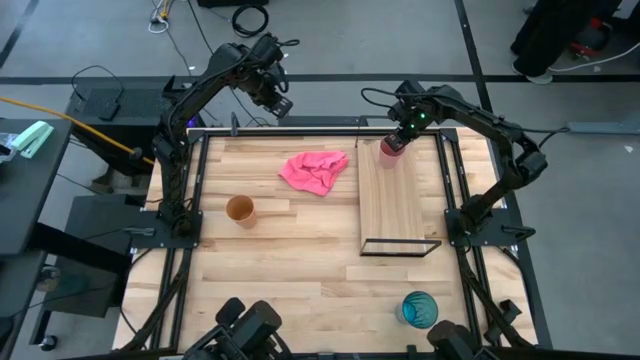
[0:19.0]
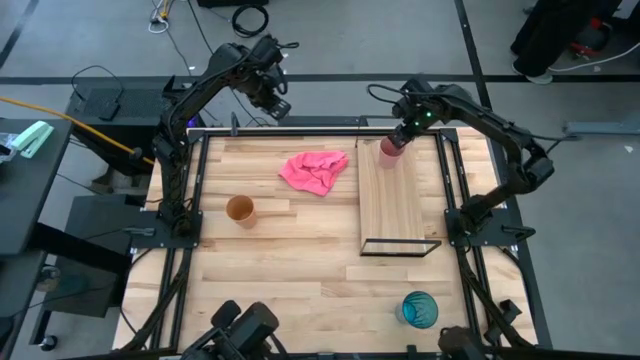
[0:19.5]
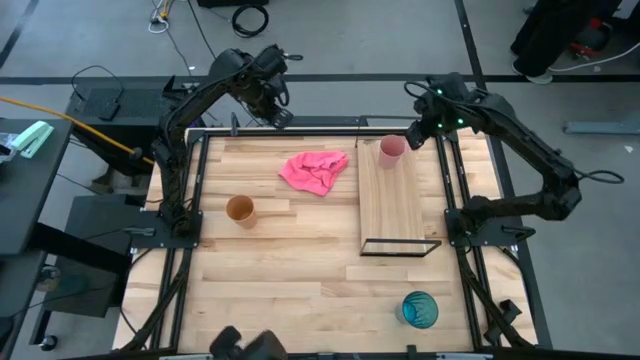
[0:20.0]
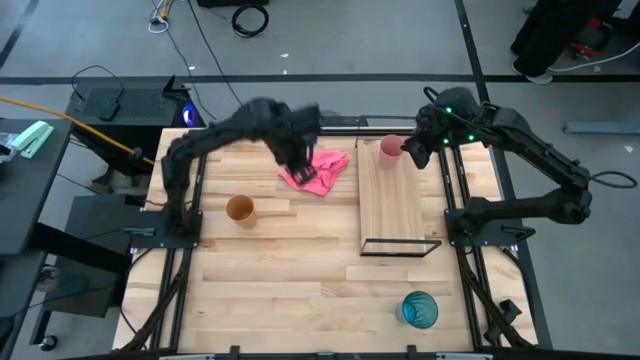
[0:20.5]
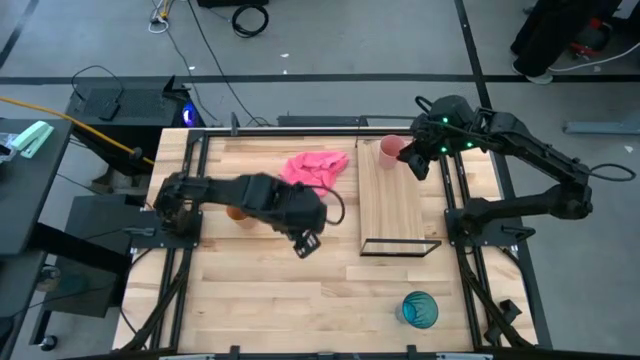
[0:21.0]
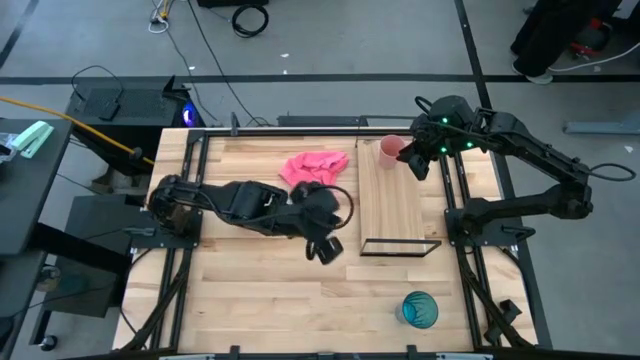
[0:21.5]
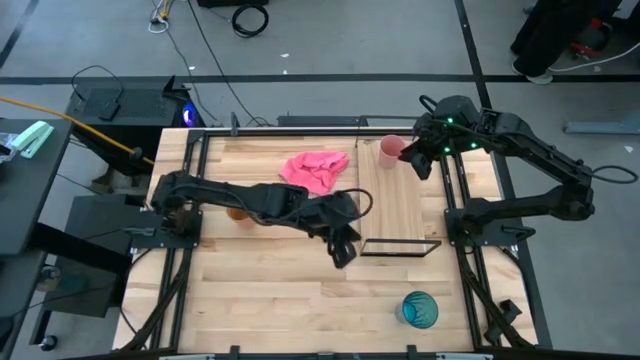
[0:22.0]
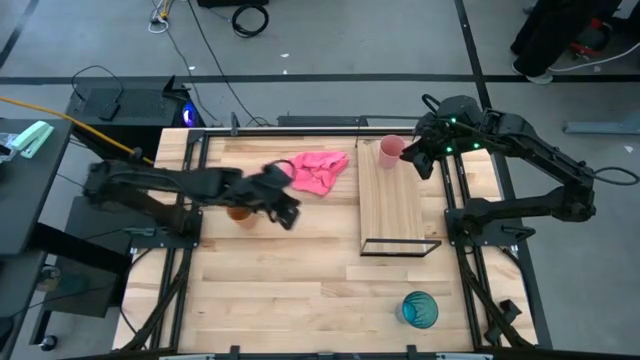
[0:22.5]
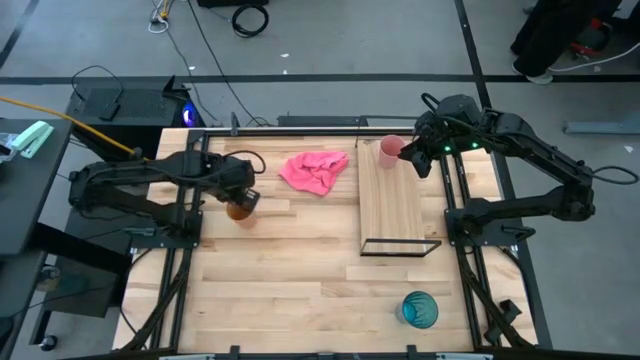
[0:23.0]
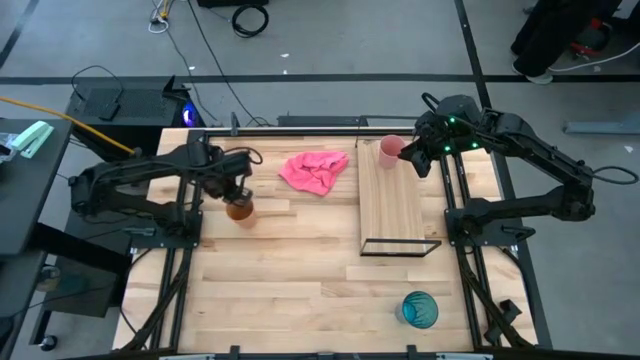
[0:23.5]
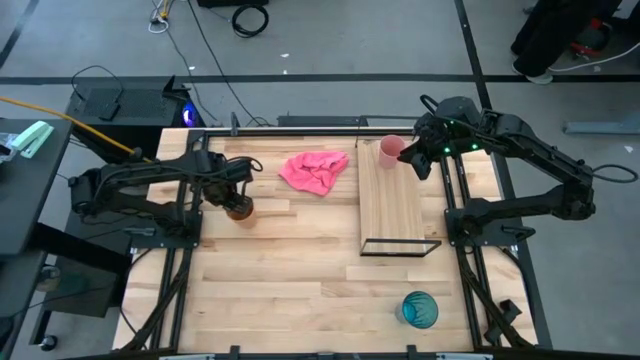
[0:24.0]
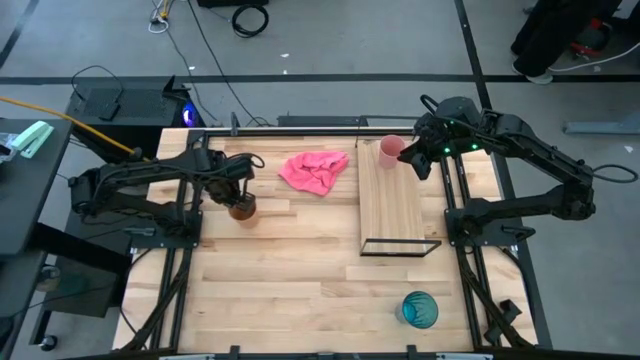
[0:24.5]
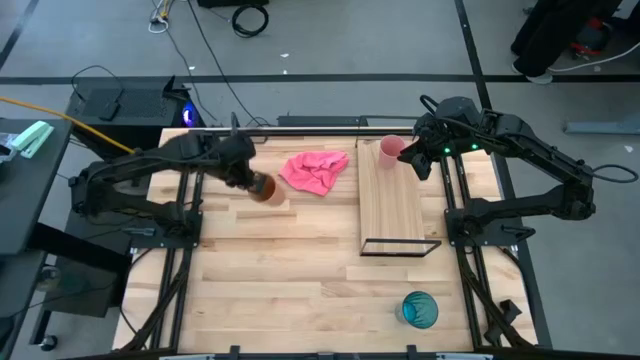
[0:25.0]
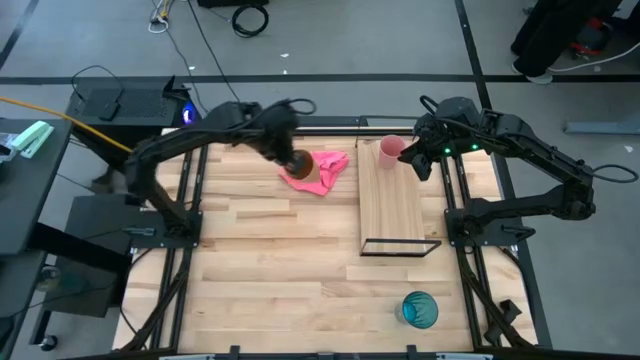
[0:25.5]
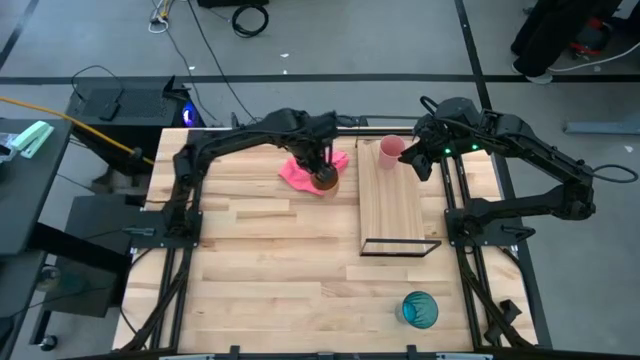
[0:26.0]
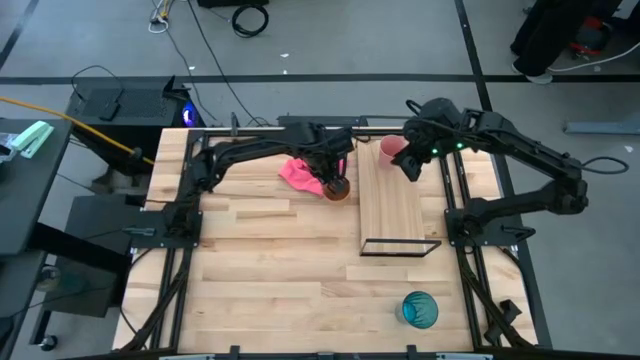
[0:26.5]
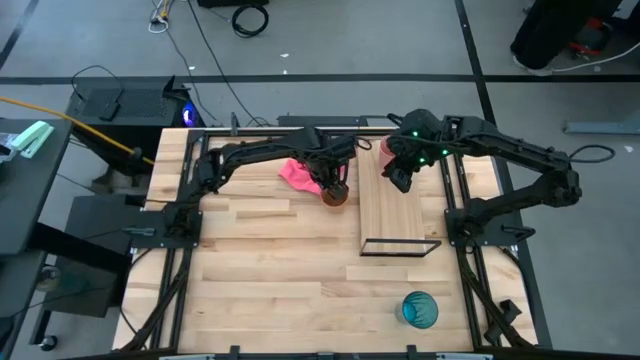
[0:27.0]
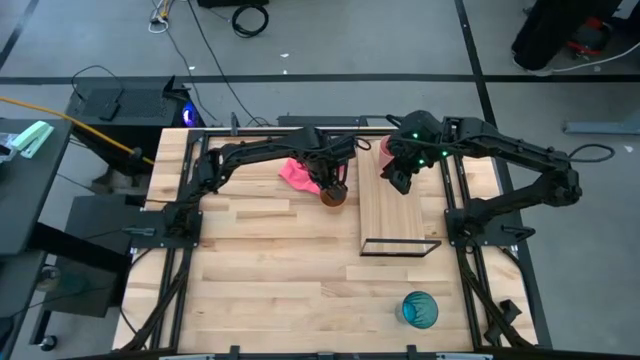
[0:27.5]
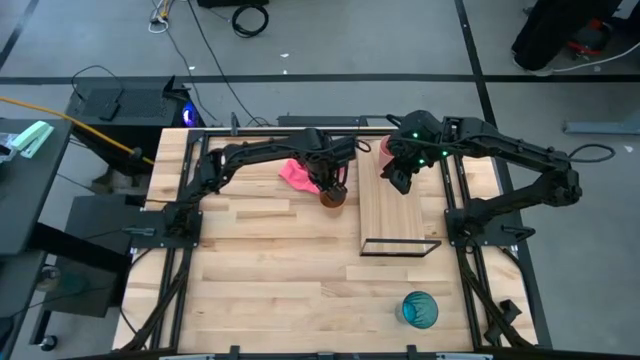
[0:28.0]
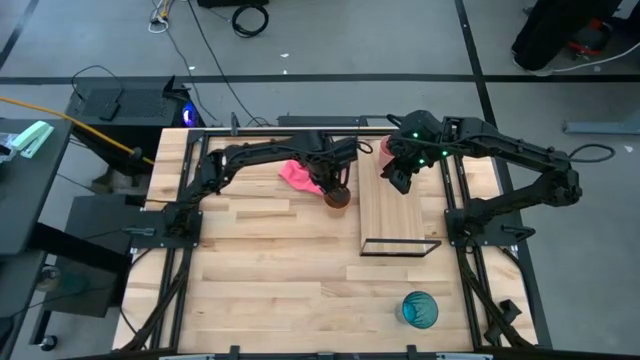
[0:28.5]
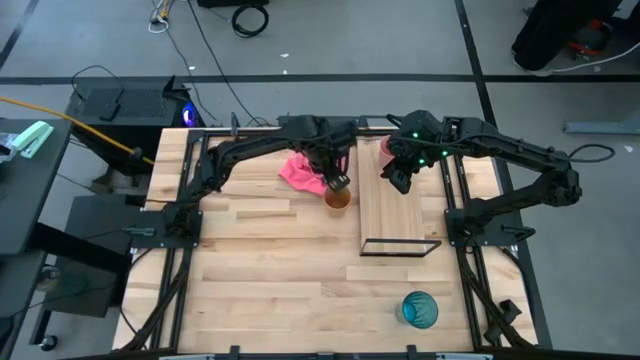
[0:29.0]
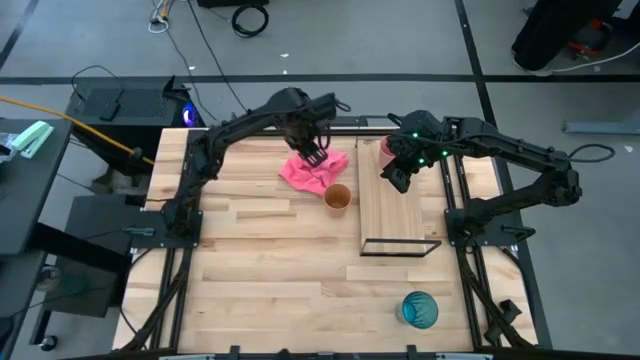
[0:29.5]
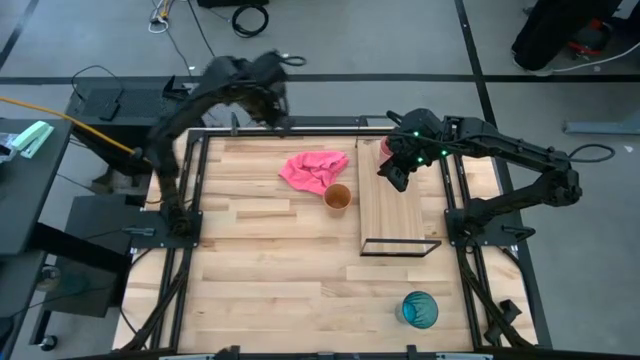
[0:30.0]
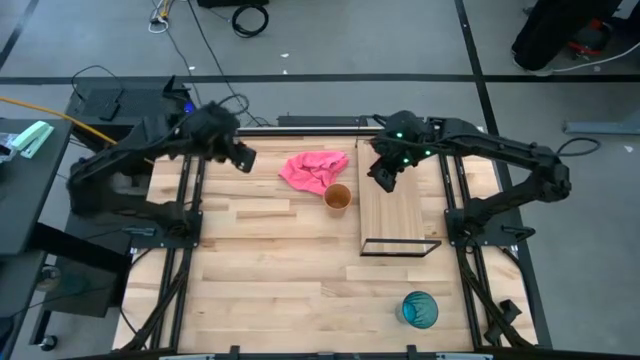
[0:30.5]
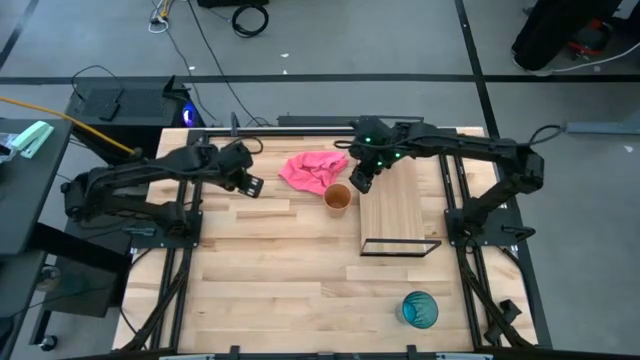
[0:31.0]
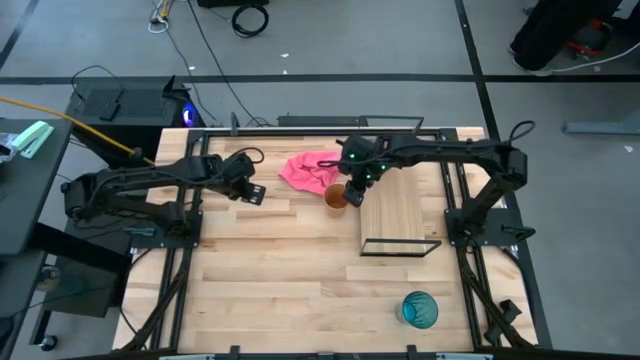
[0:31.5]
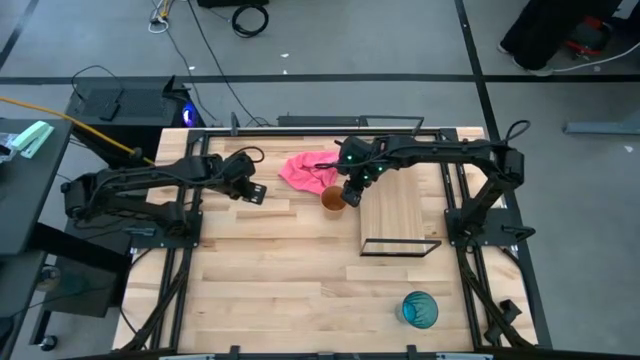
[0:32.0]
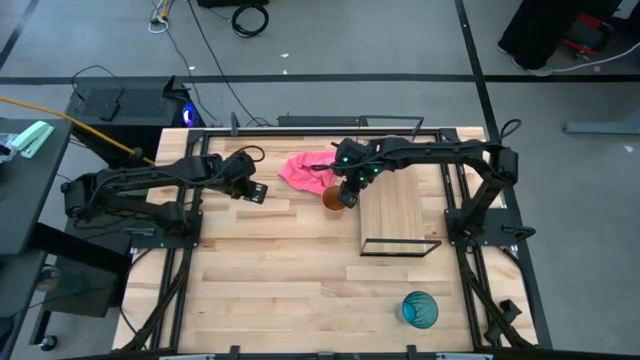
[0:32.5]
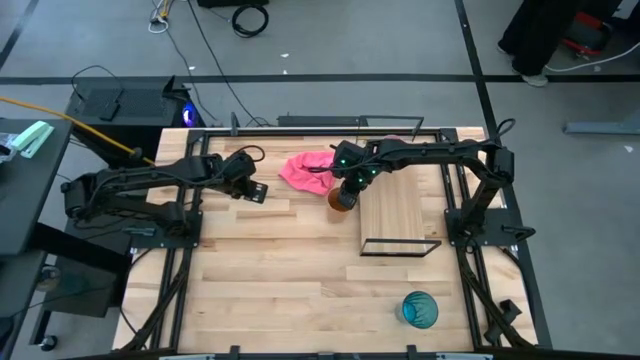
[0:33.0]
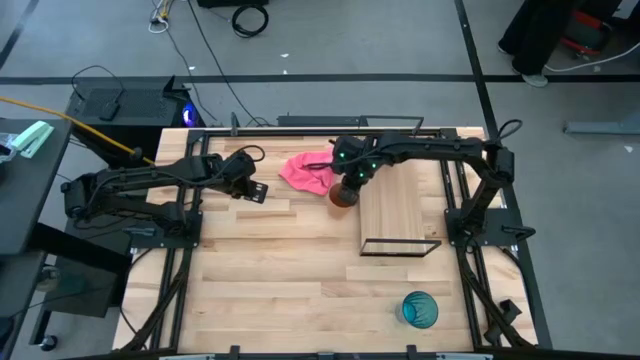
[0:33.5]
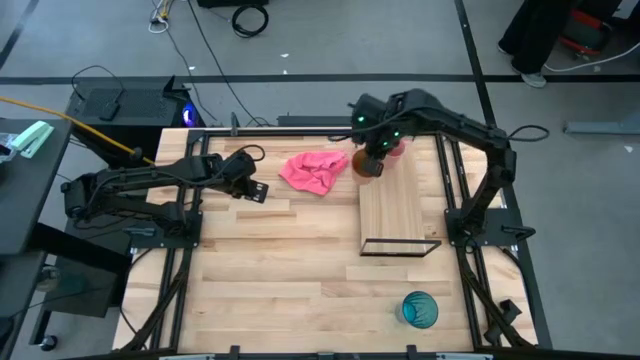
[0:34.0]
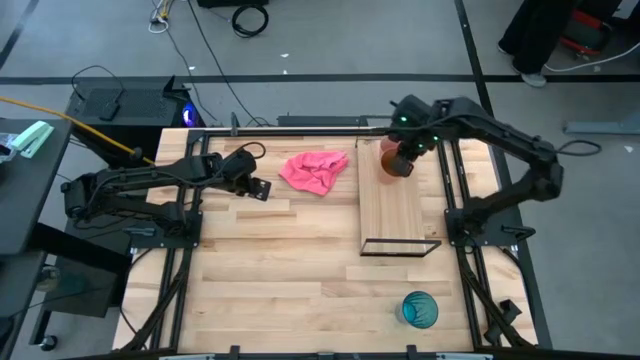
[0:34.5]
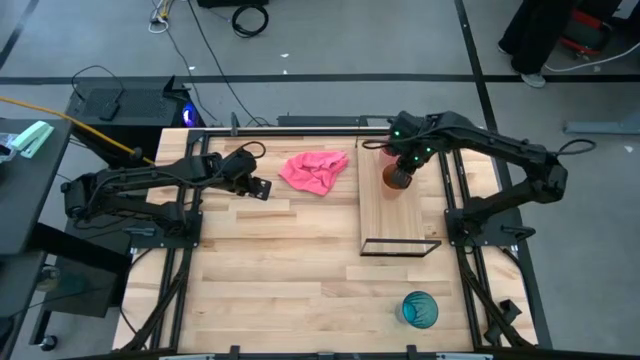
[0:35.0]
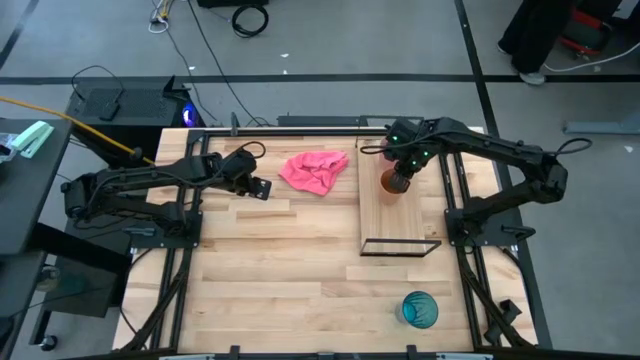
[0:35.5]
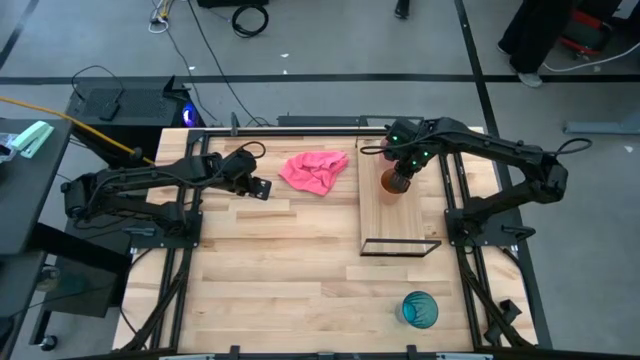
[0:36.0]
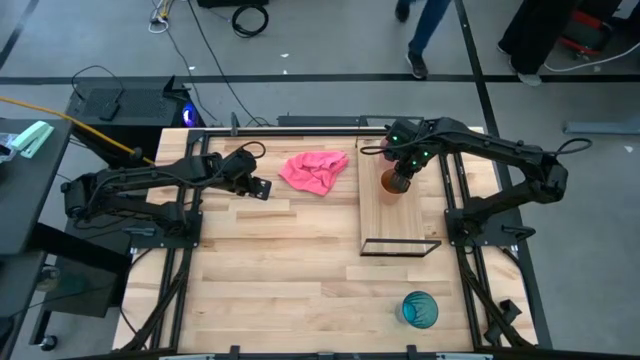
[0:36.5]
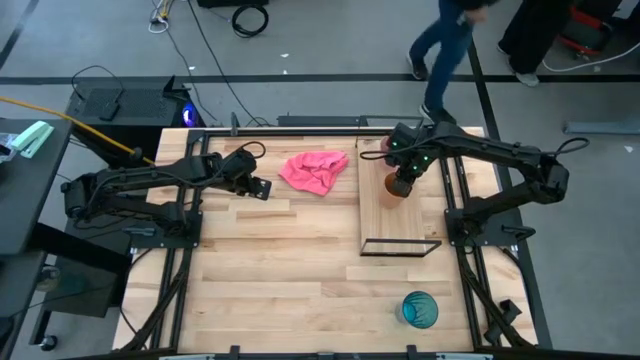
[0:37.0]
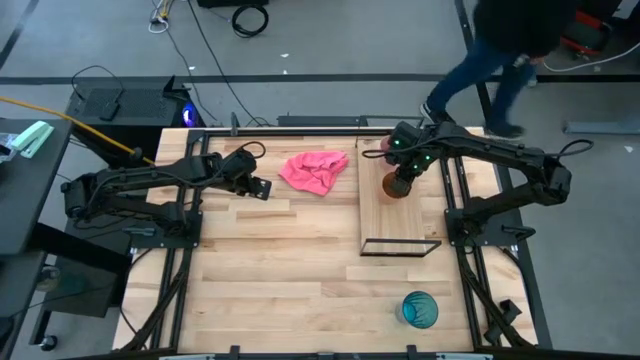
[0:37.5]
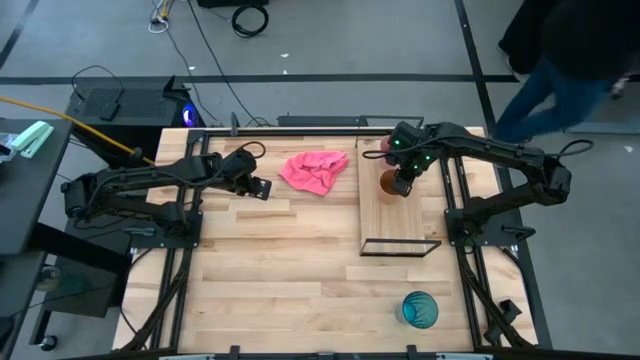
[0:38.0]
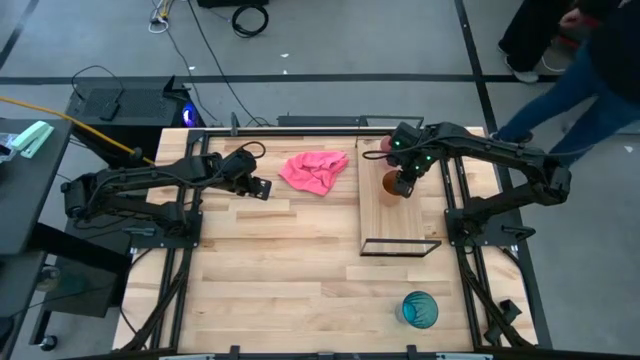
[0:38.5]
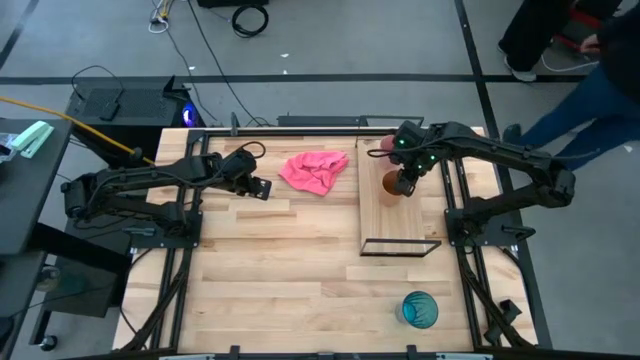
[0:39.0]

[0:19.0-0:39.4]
Task: Stack small to large cups/mugs on shelf
Put the orange cup on the shelf
